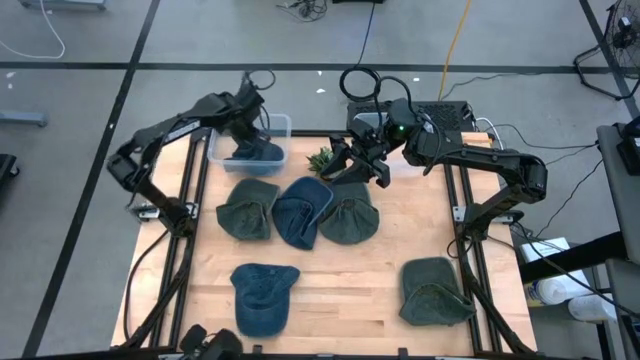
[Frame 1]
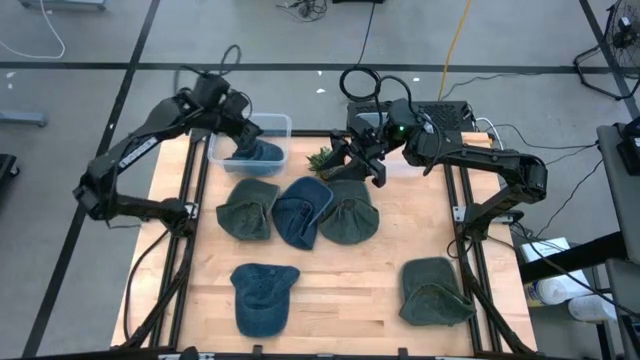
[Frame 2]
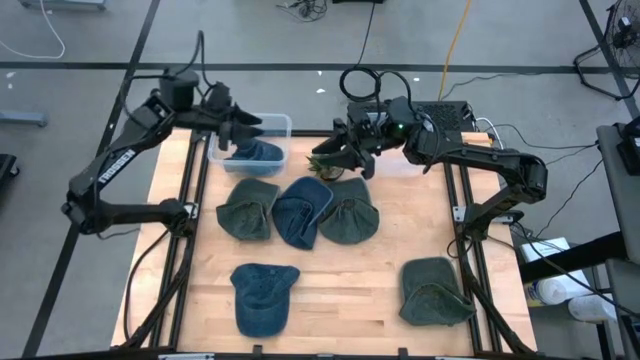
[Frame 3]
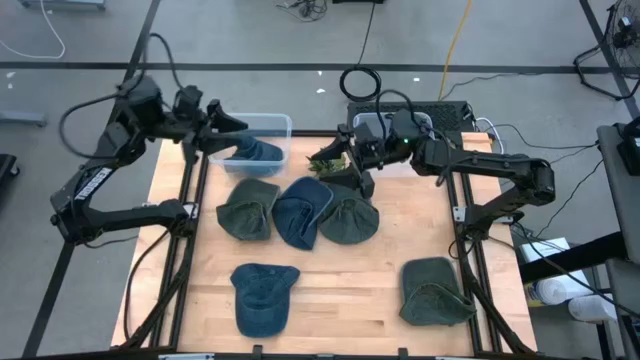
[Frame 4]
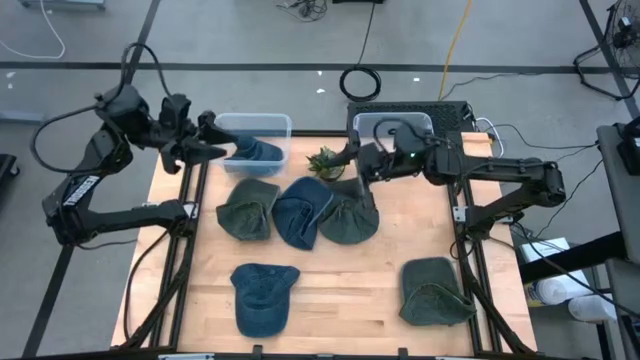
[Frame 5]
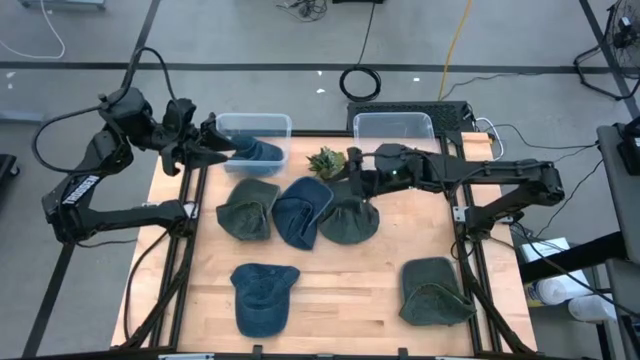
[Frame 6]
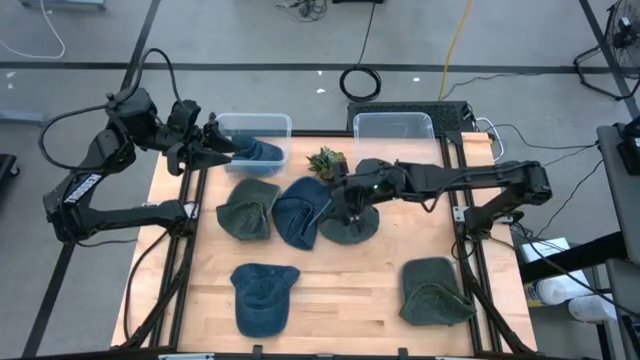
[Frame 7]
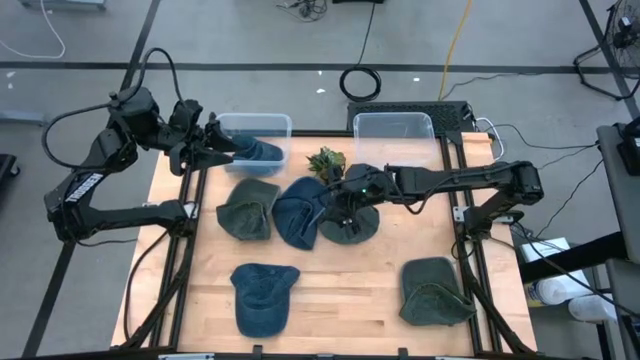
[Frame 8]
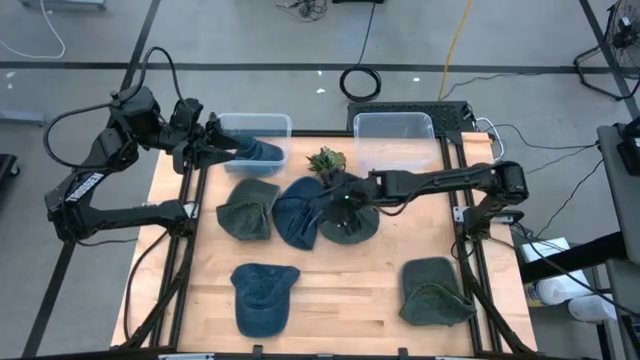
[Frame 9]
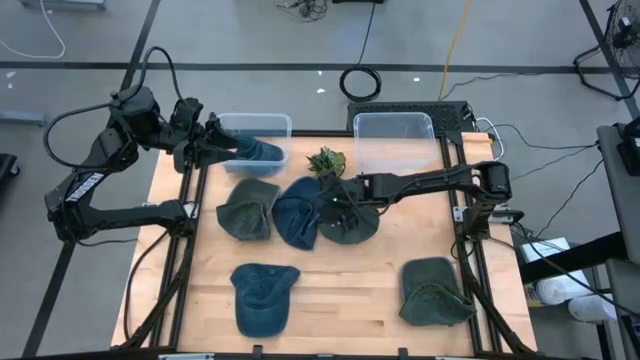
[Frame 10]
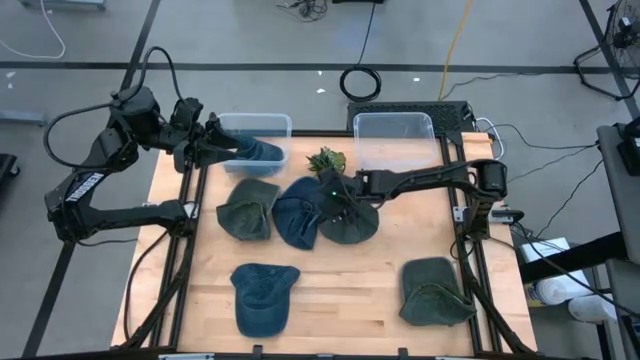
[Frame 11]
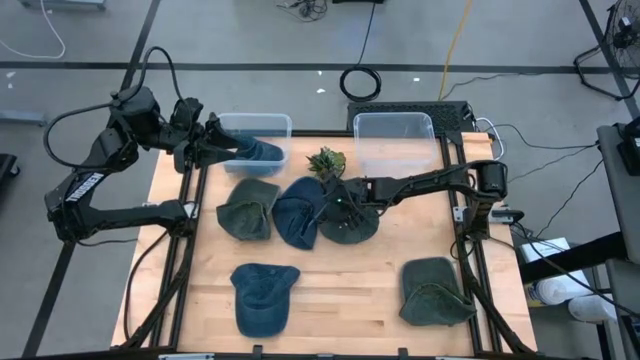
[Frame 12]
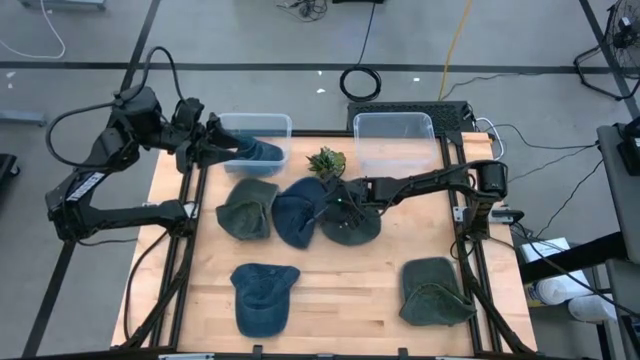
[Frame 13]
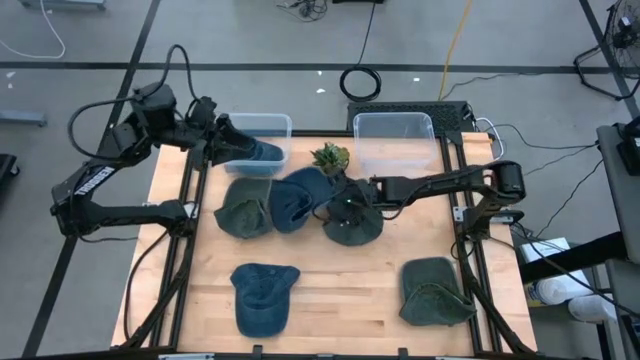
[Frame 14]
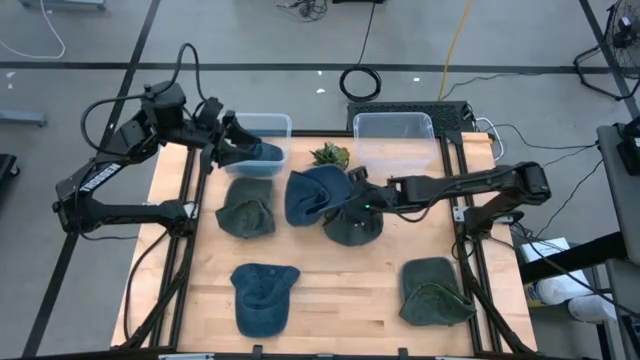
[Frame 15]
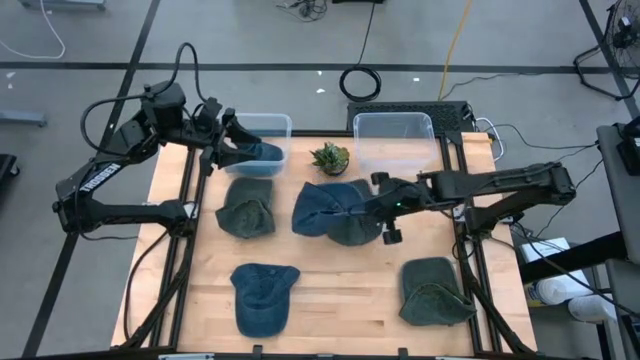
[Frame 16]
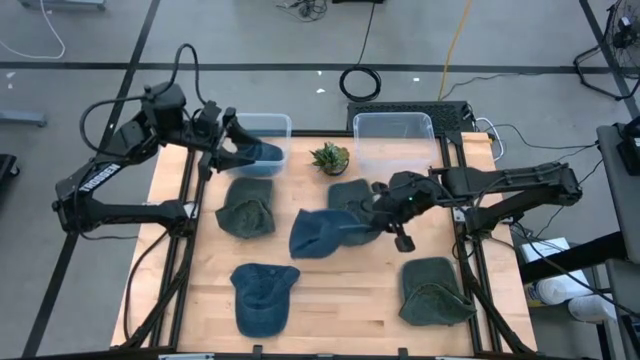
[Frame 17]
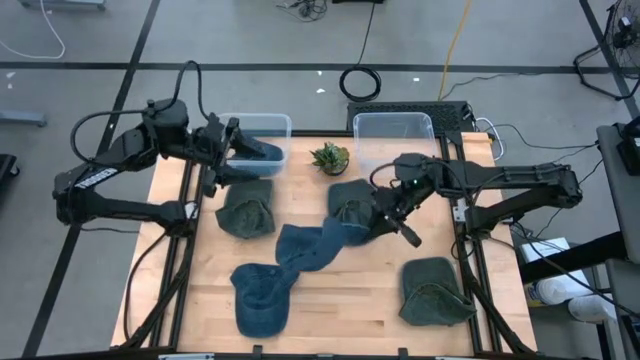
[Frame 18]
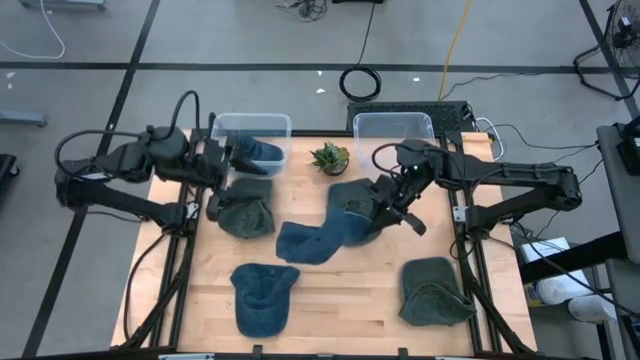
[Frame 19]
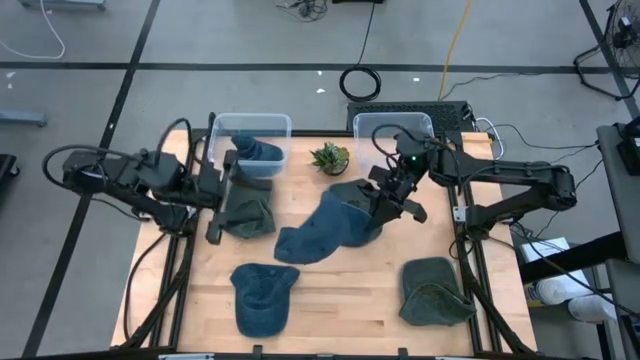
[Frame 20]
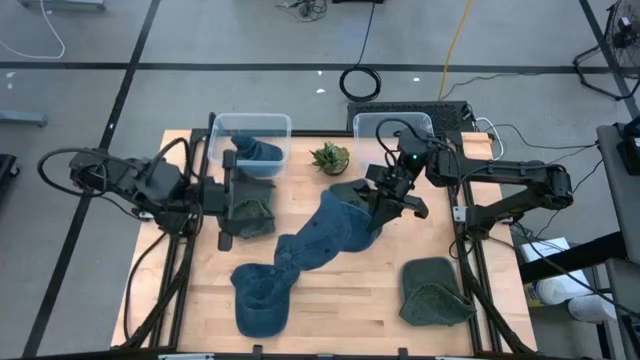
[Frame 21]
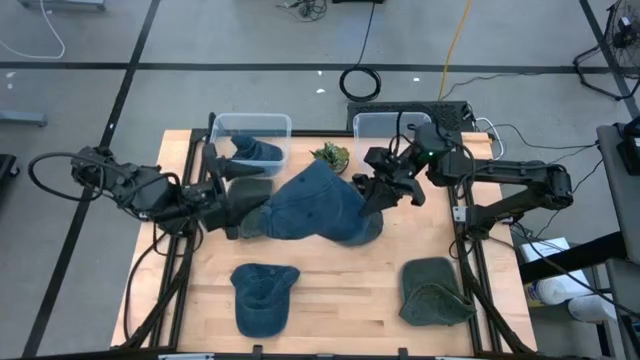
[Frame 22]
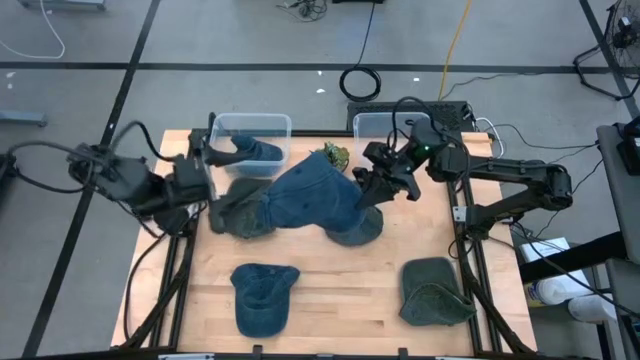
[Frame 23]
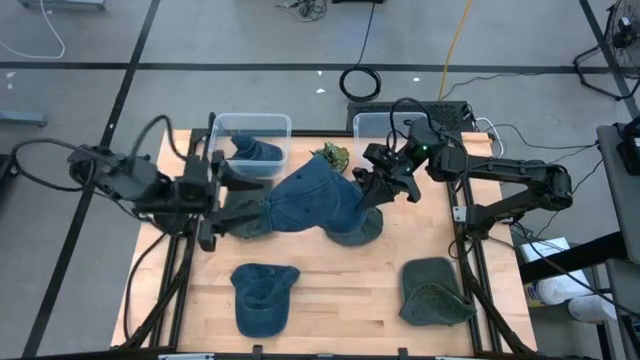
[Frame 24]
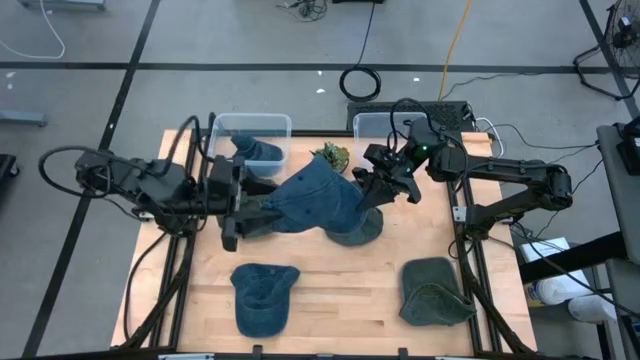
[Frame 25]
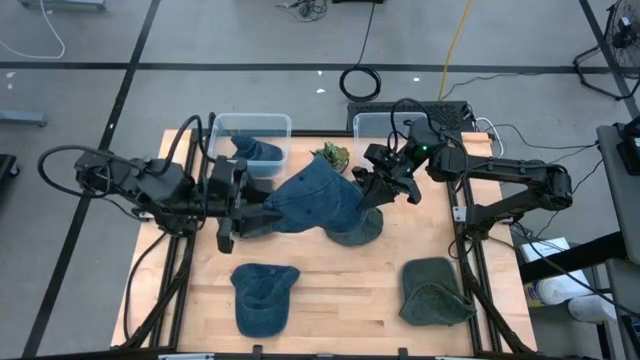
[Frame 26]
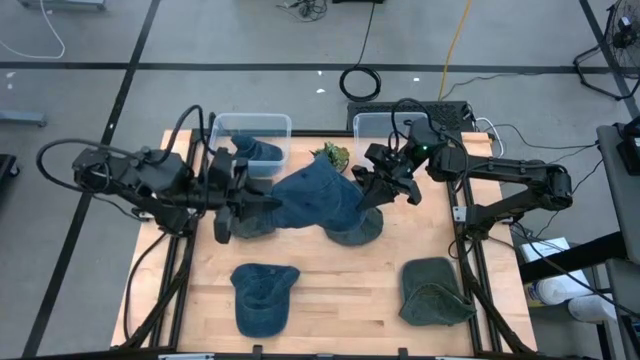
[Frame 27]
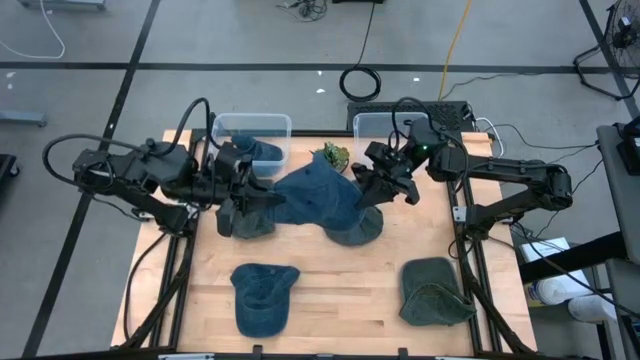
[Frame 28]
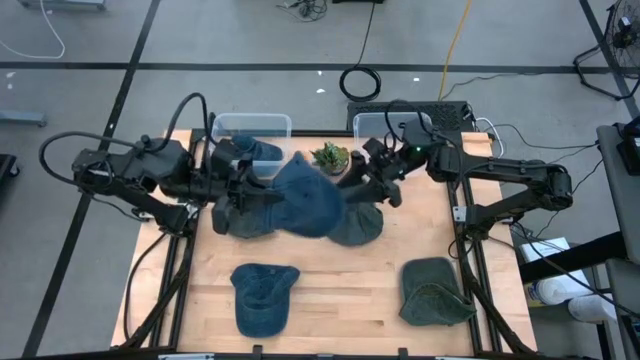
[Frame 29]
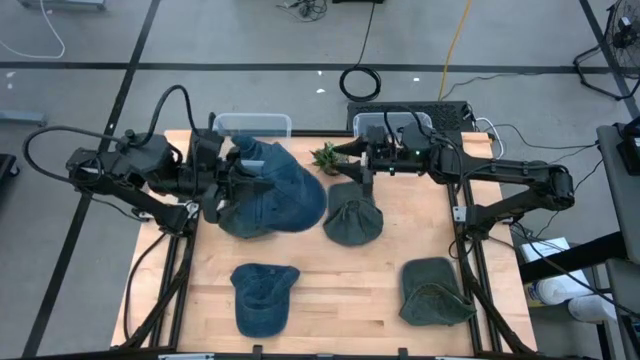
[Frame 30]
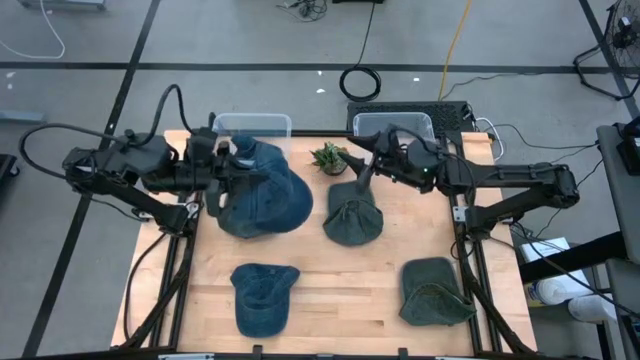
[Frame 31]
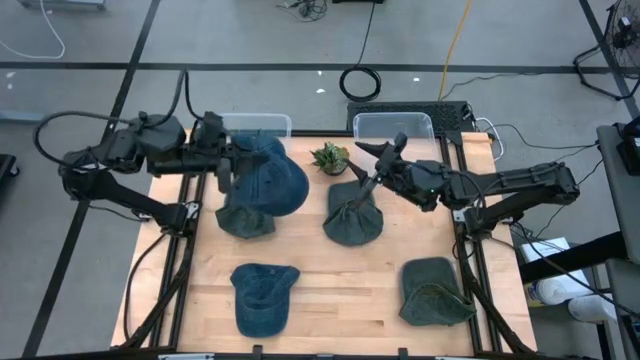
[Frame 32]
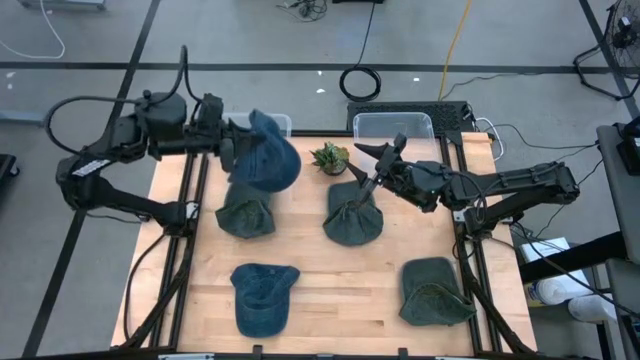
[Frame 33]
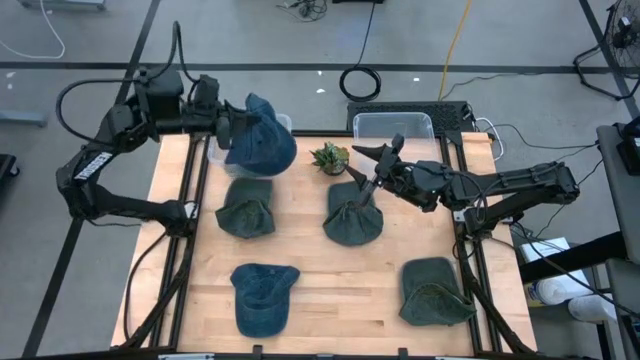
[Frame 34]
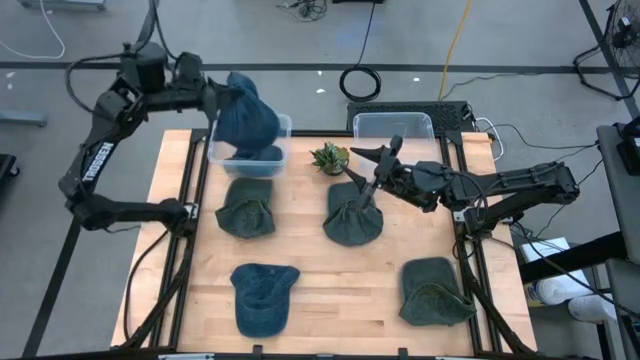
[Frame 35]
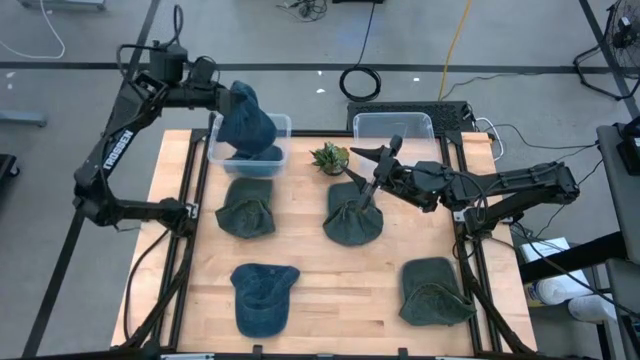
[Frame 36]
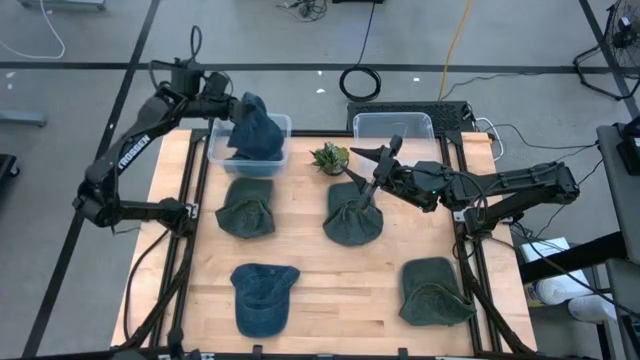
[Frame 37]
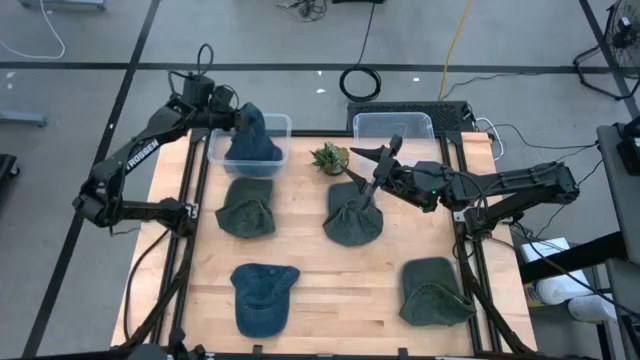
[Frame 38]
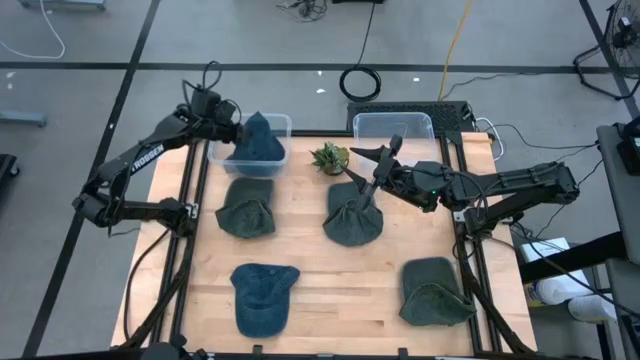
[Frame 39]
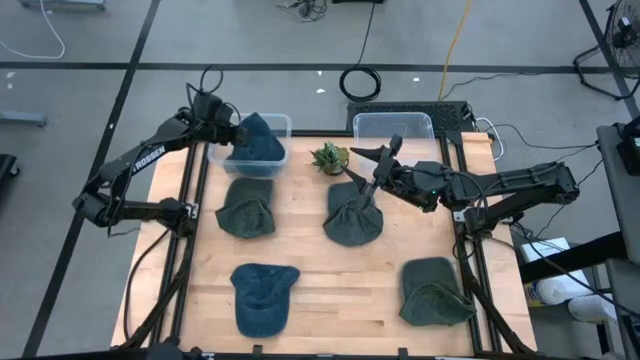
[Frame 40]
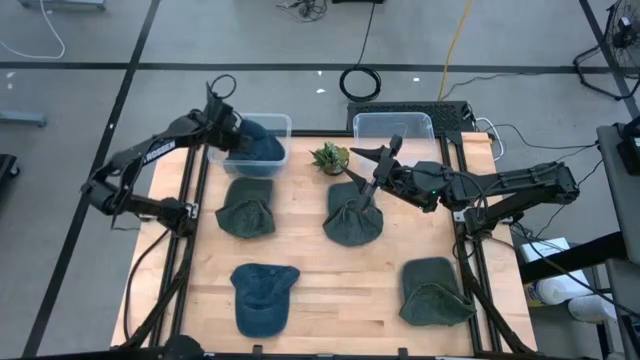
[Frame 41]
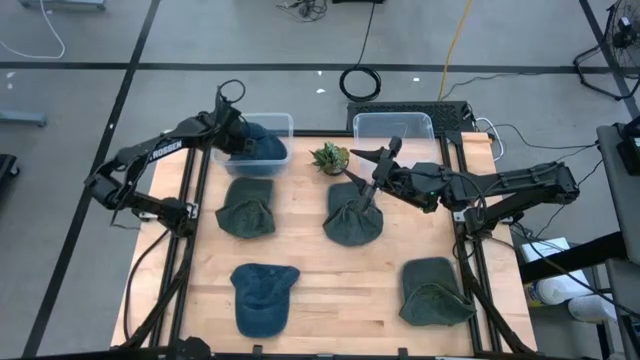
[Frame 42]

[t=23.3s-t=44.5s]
Task: Pick & Place hat
Put the top blue cap into the left transparent bin
